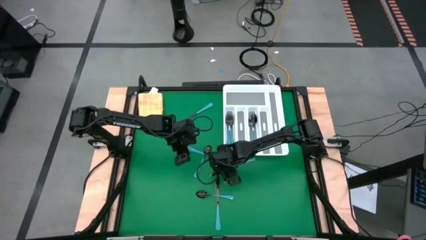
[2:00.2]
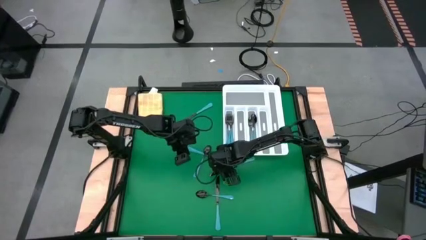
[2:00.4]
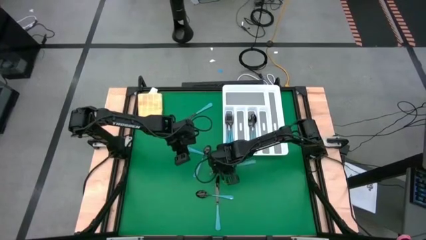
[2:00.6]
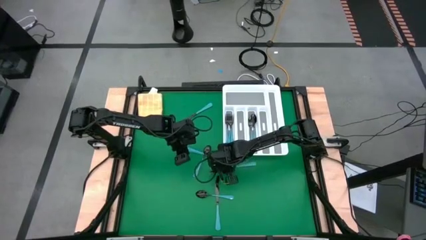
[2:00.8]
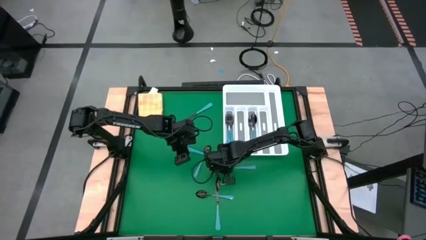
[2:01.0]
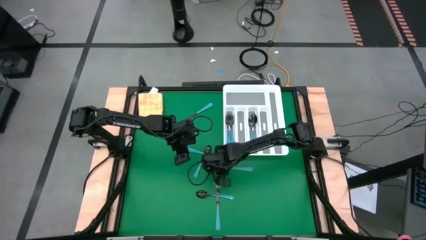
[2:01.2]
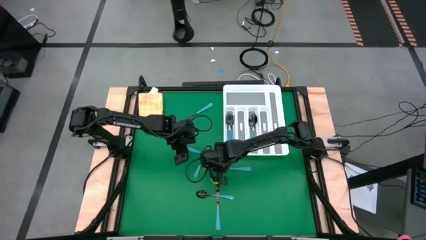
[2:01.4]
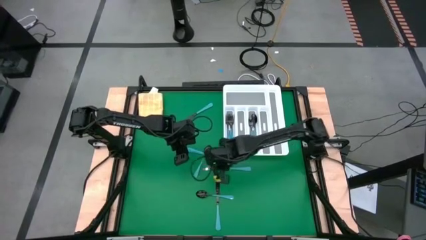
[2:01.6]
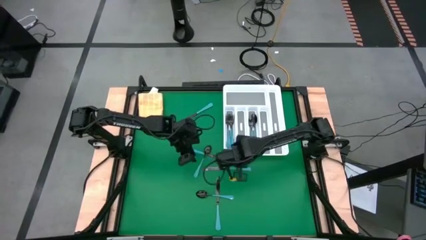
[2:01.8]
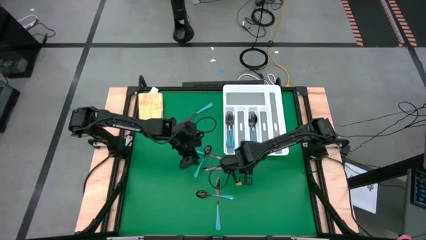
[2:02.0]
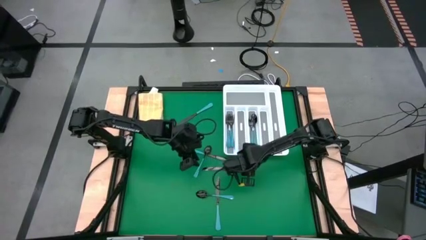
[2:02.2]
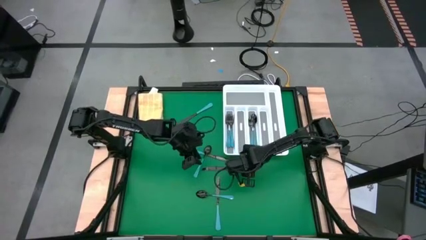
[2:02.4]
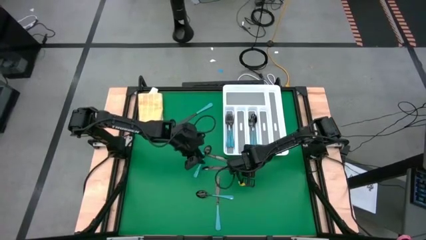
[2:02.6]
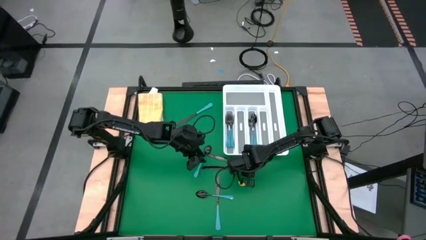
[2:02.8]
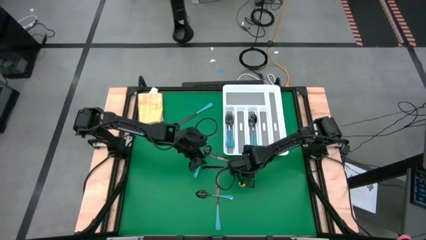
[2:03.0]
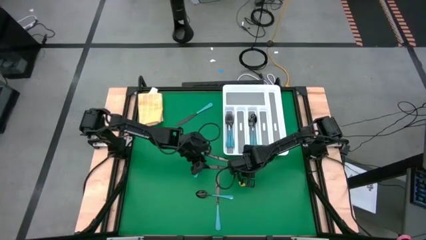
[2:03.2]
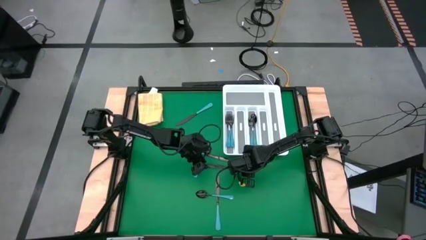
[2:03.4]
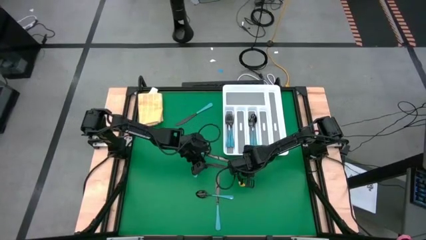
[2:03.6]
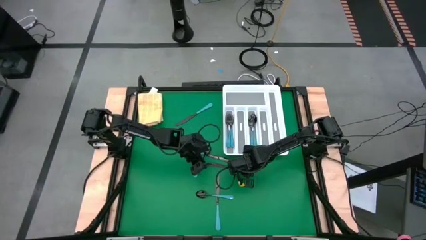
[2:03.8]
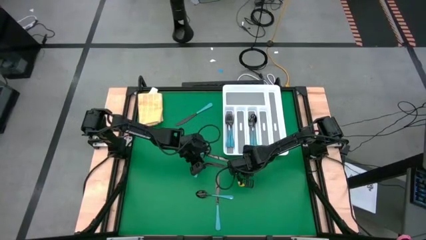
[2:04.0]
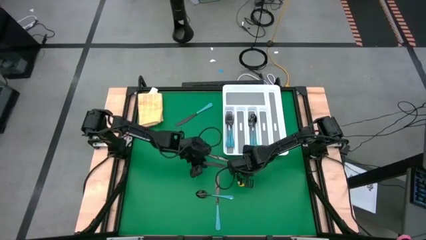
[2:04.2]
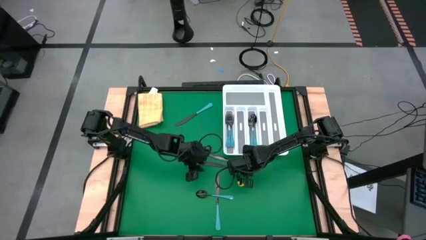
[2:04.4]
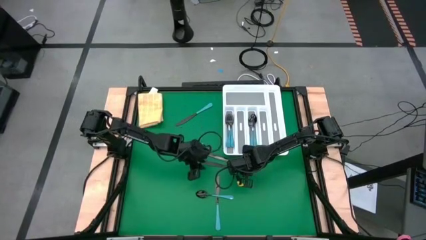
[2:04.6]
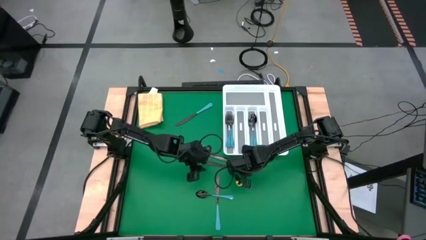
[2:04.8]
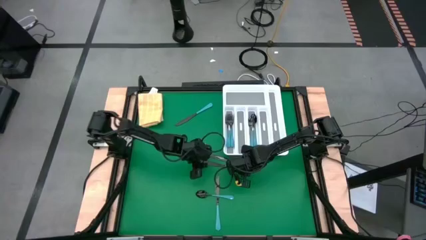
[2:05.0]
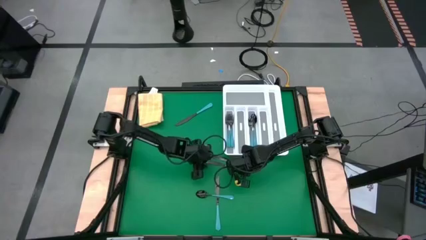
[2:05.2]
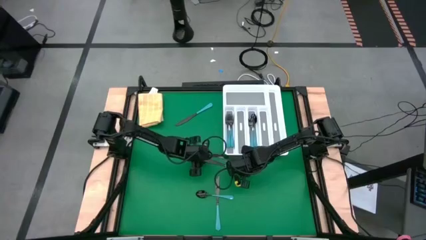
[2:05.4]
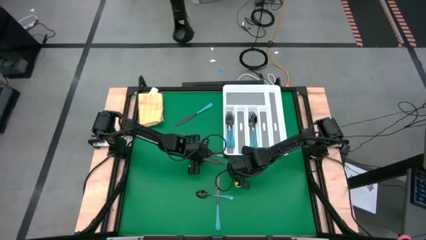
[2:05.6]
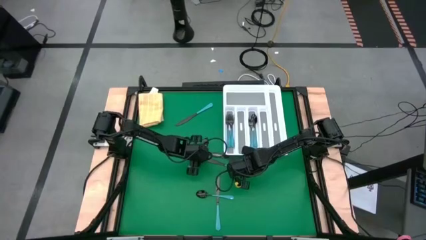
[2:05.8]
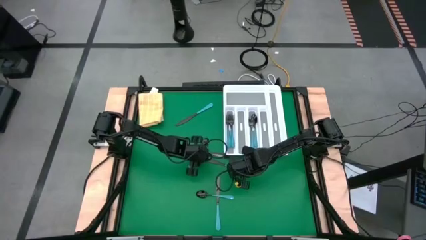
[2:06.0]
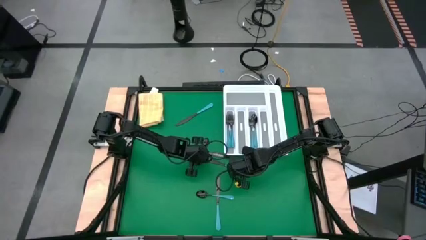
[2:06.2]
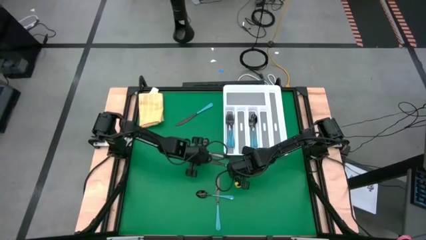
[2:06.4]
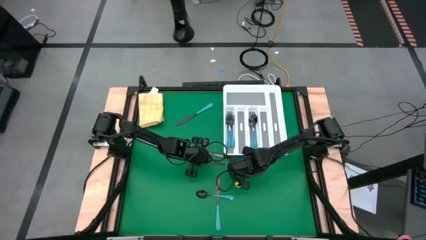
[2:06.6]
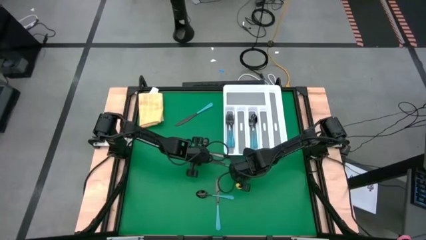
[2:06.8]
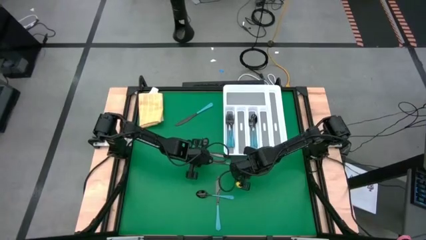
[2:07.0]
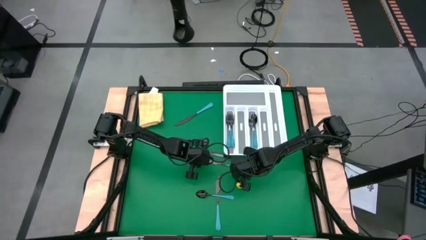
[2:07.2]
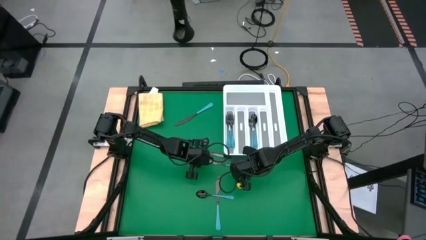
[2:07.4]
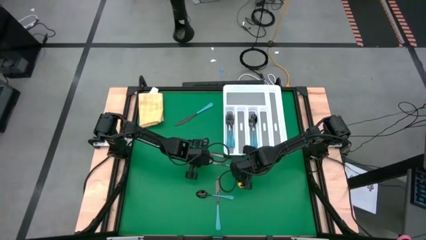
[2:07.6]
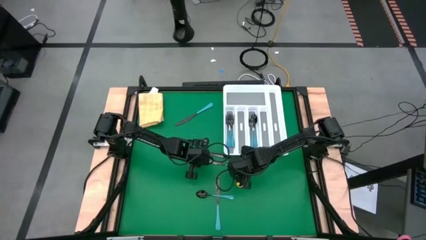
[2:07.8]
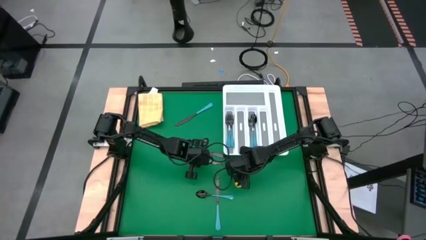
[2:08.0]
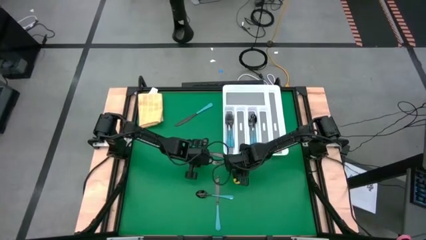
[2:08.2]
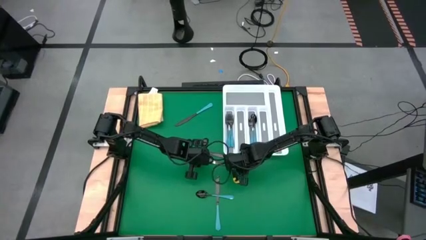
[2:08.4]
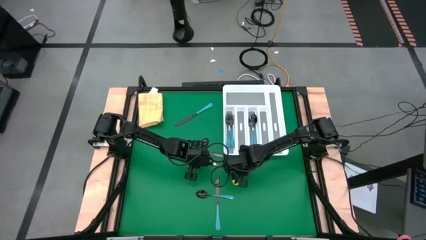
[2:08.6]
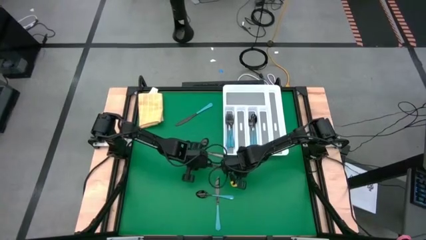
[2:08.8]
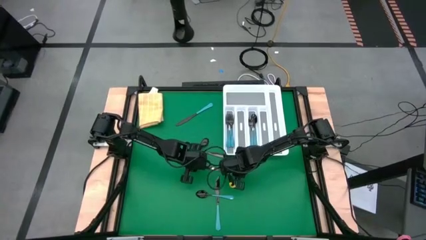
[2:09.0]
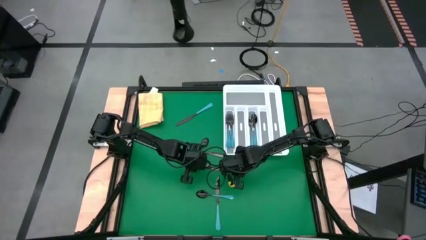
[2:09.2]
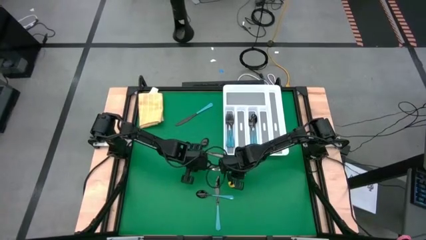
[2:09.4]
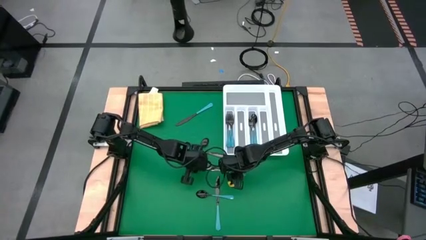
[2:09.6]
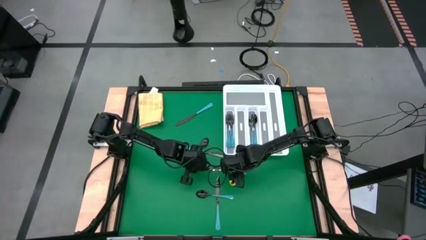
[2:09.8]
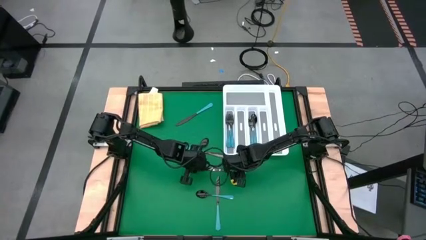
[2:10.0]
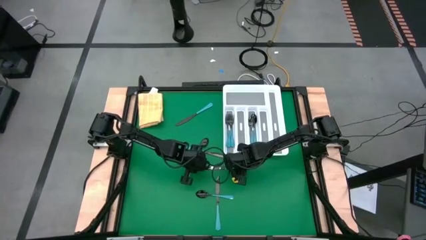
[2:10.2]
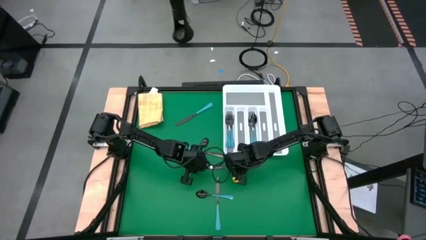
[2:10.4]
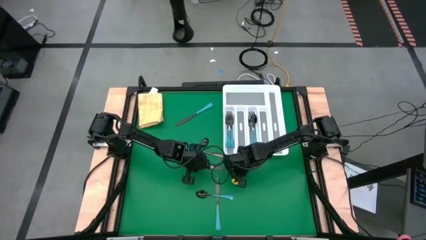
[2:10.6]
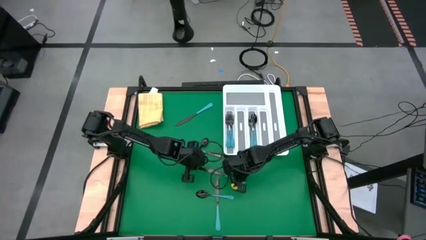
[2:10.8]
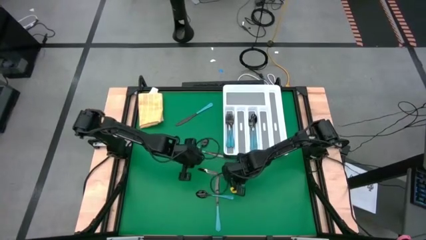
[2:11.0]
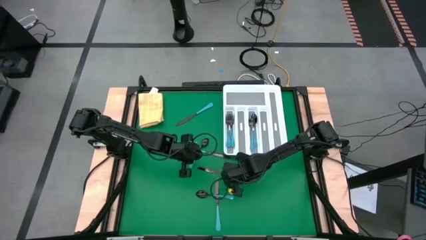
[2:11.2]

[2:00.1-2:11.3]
Task: Sort silverware
Put the blue table knife into the silverware organizer

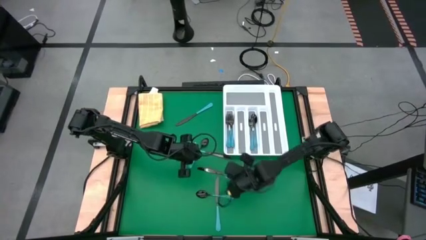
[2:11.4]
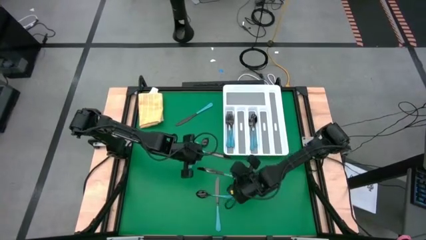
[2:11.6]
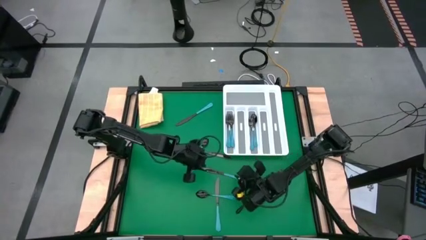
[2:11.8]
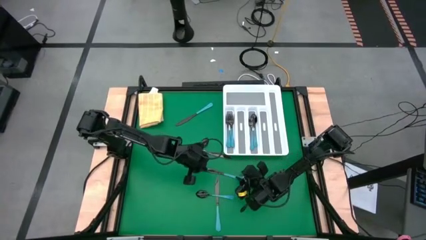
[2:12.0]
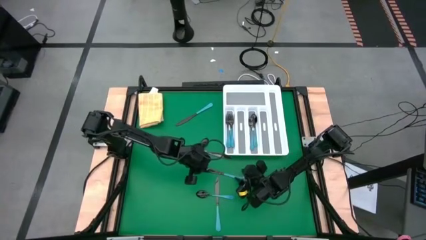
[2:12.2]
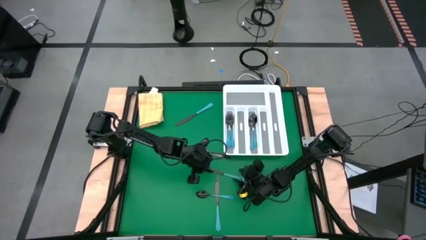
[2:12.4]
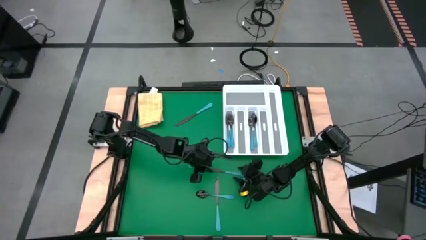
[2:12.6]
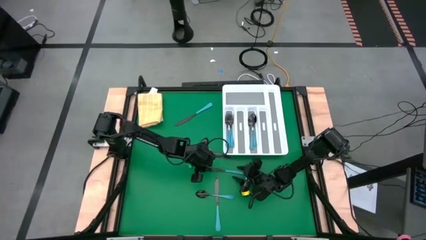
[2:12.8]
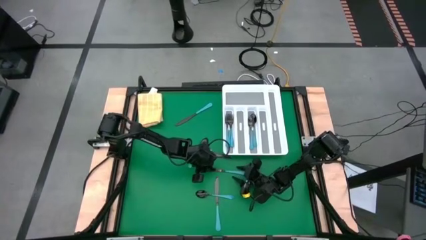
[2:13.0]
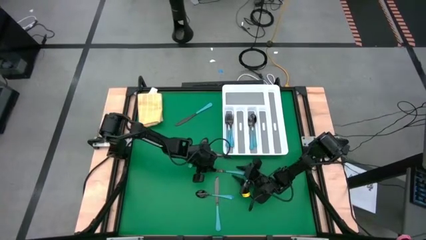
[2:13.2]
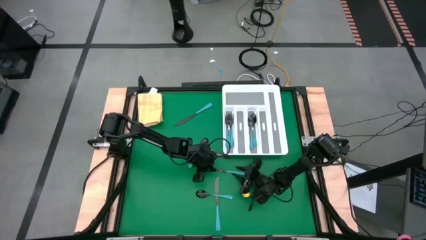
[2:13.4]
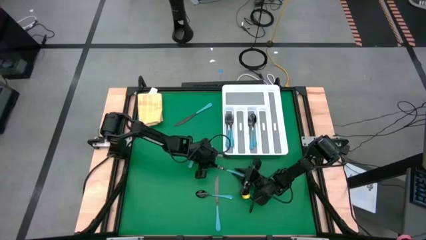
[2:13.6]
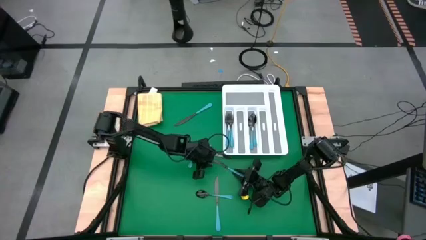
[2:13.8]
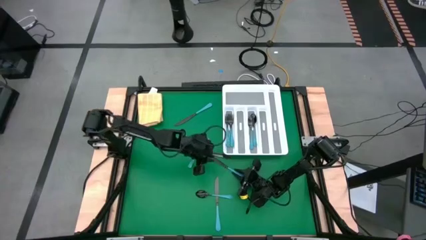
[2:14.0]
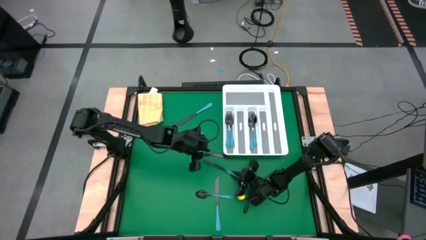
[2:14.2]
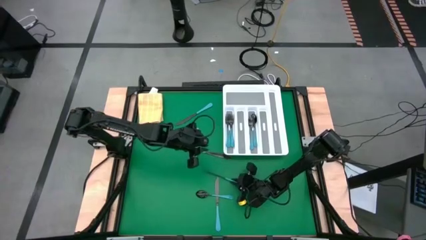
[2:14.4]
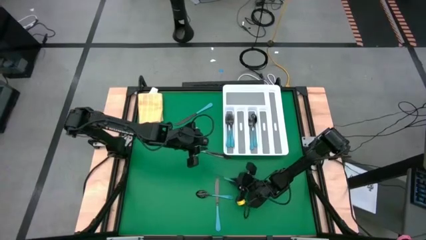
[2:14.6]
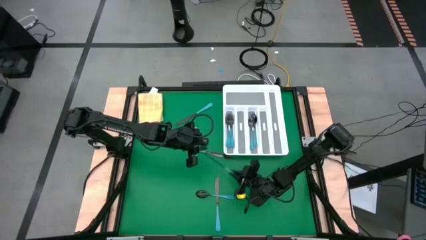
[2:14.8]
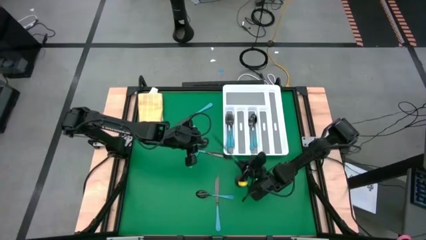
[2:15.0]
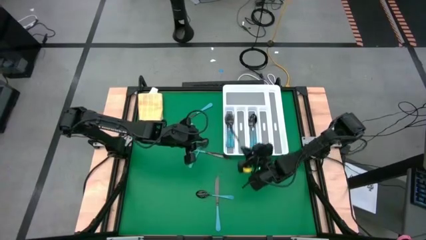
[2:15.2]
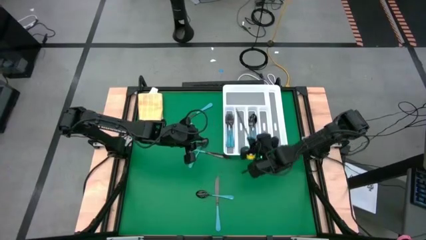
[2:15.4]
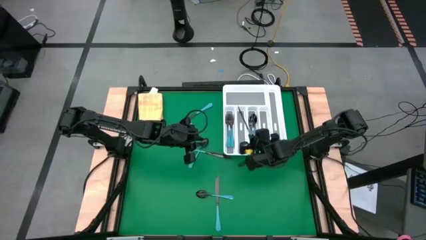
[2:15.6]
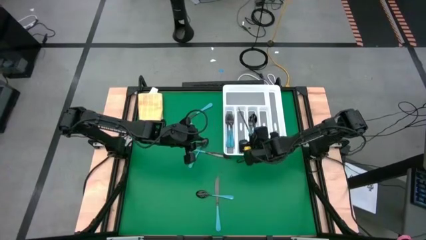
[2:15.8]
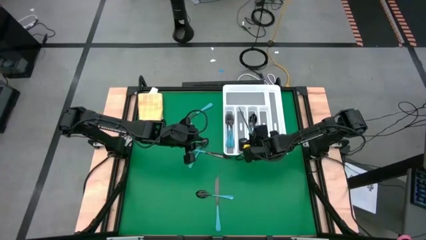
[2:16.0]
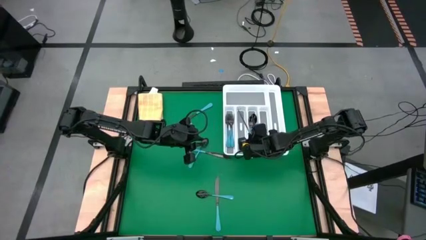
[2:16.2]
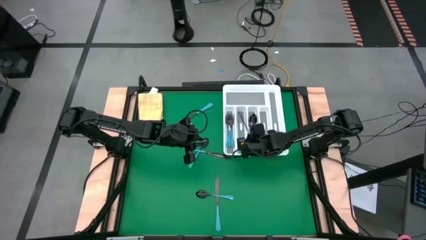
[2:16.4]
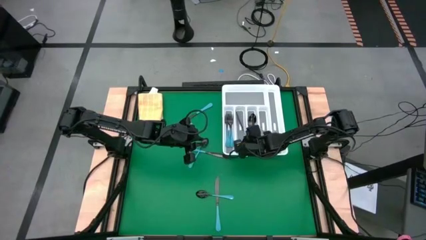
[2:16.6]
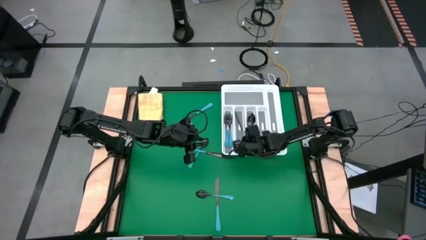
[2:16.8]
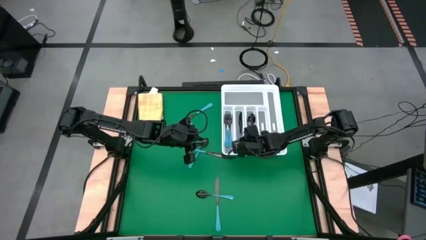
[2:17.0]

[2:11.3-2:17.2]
Put the blue table knife into the silverware organizer
